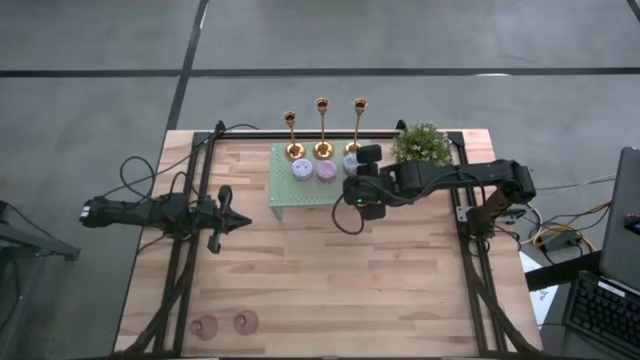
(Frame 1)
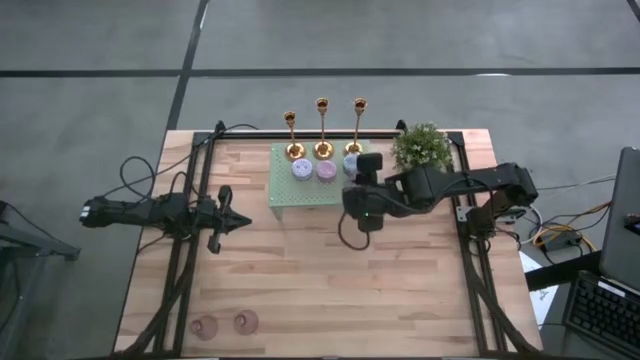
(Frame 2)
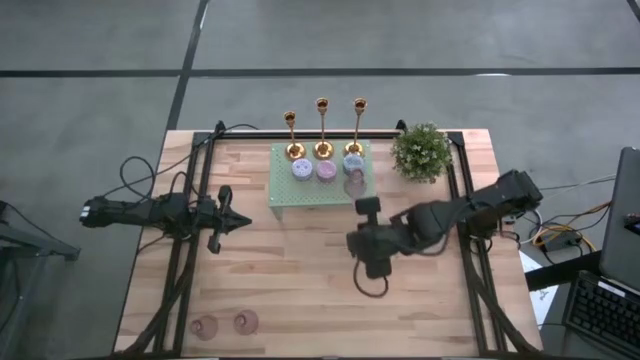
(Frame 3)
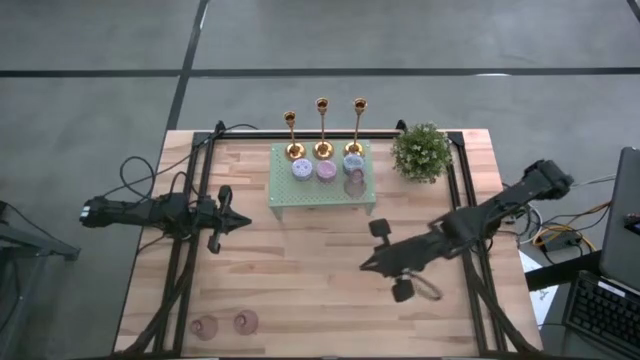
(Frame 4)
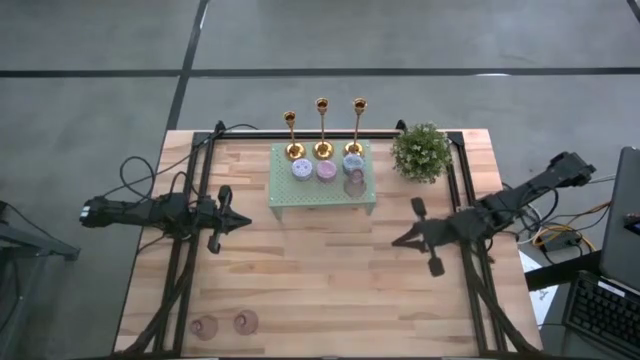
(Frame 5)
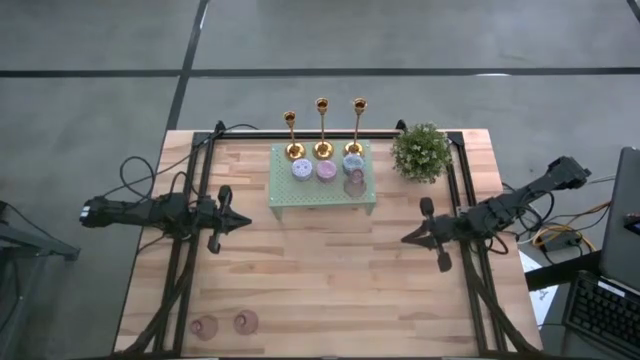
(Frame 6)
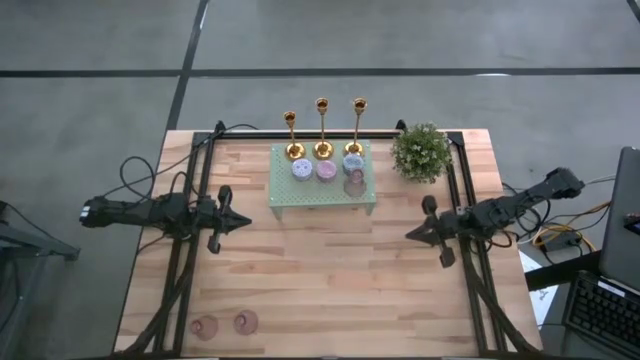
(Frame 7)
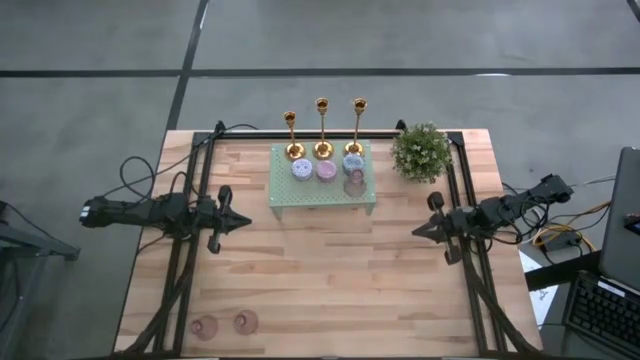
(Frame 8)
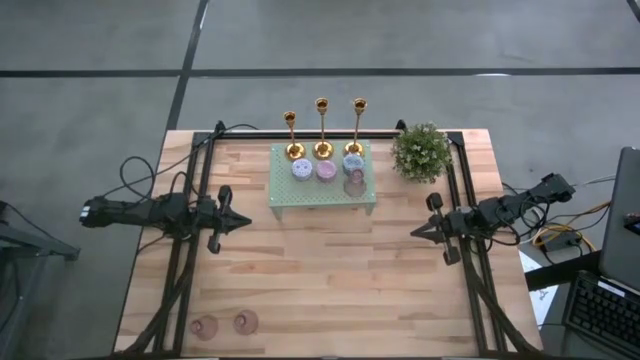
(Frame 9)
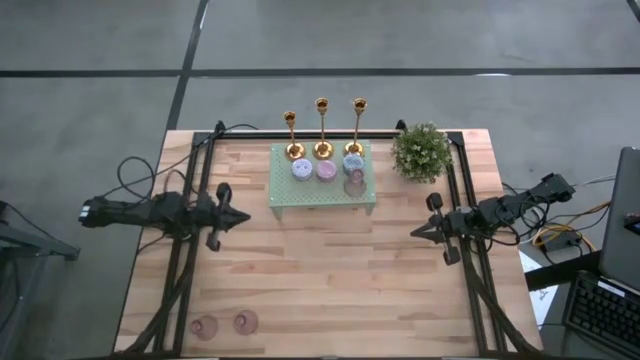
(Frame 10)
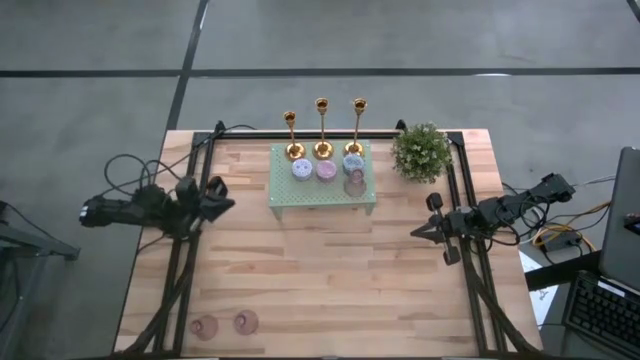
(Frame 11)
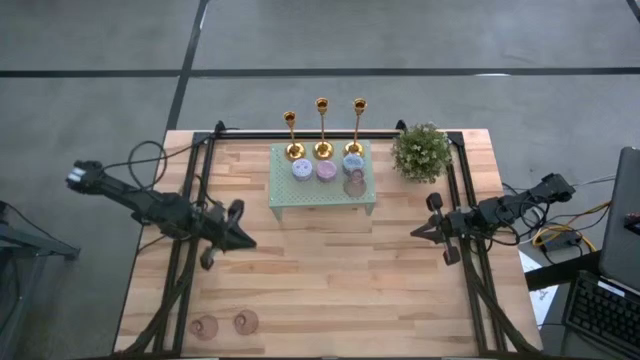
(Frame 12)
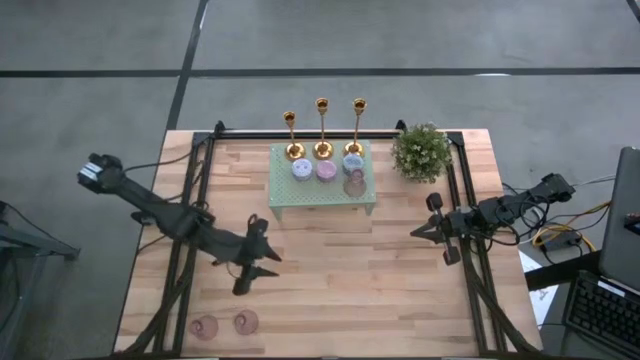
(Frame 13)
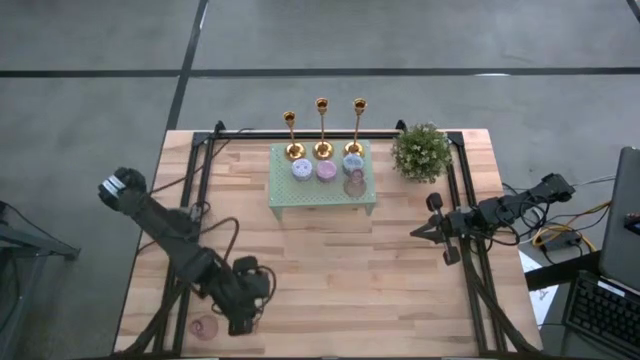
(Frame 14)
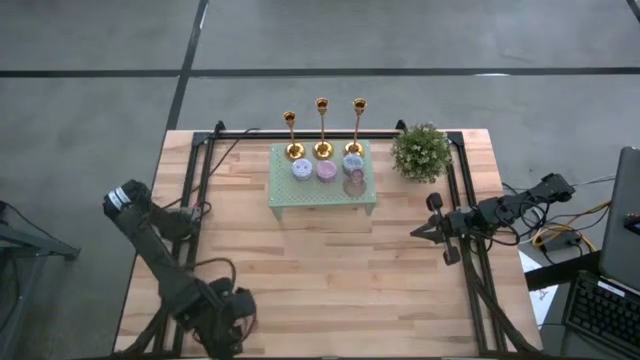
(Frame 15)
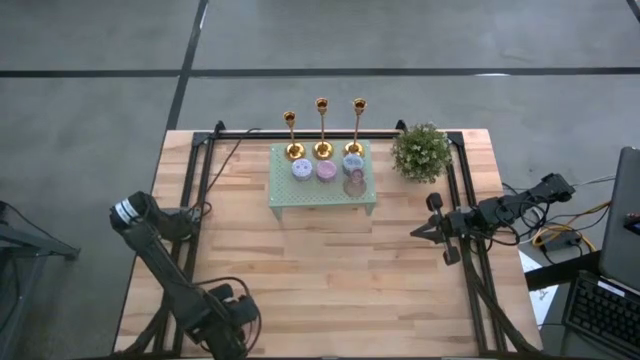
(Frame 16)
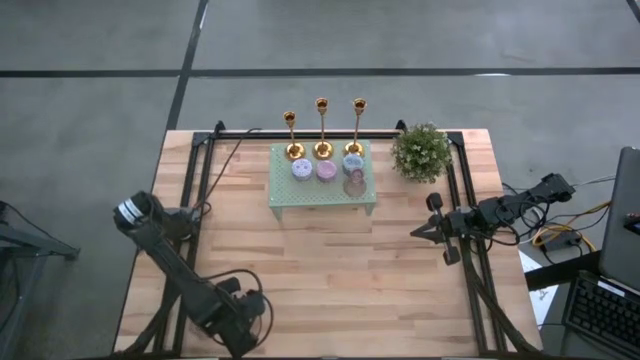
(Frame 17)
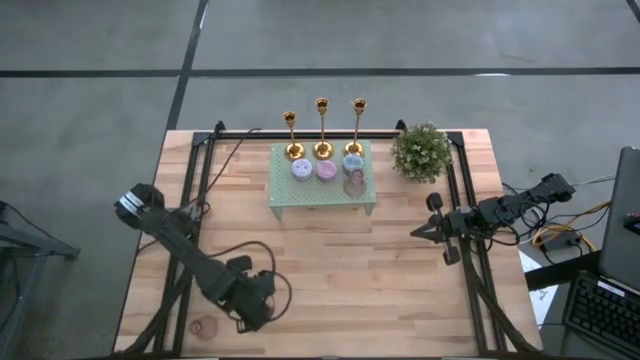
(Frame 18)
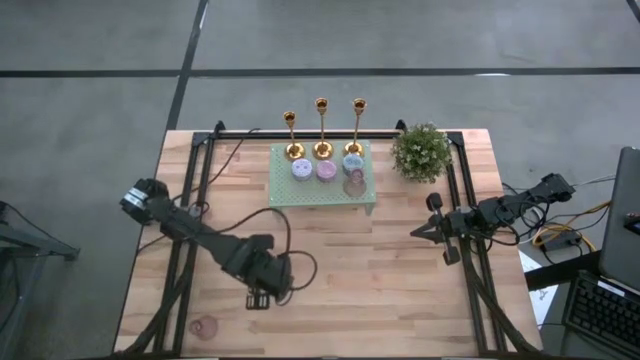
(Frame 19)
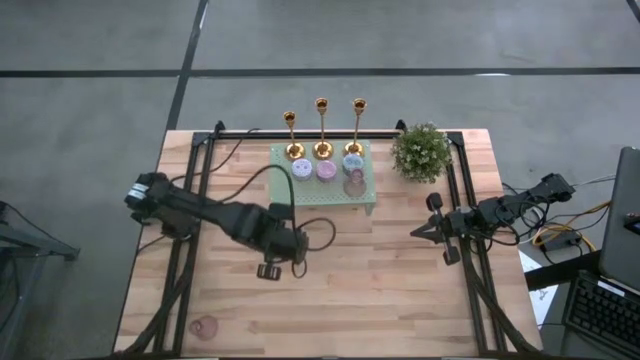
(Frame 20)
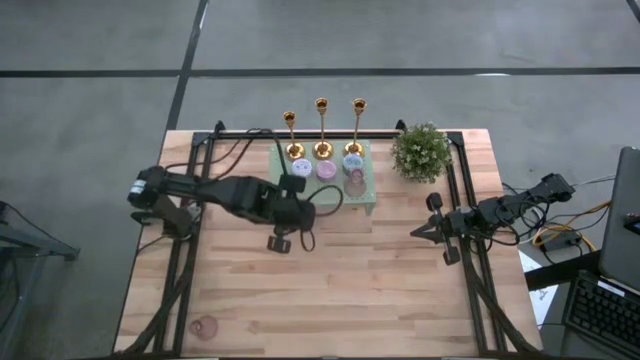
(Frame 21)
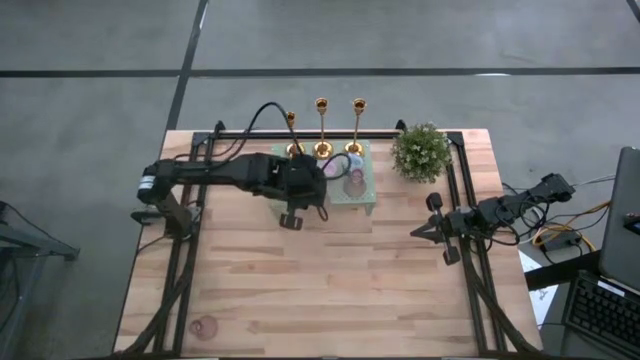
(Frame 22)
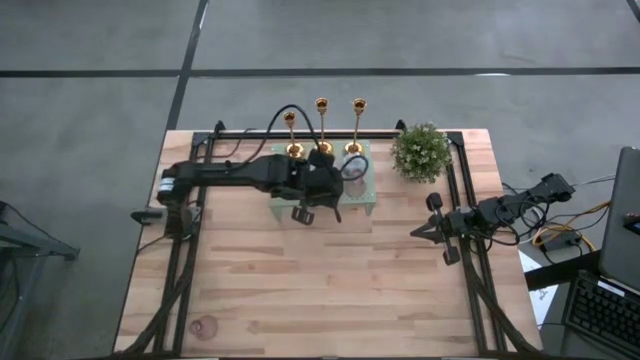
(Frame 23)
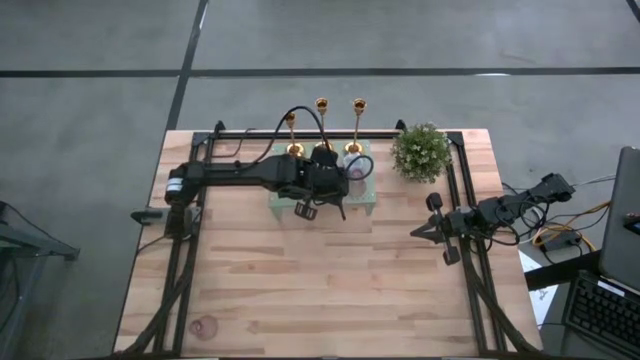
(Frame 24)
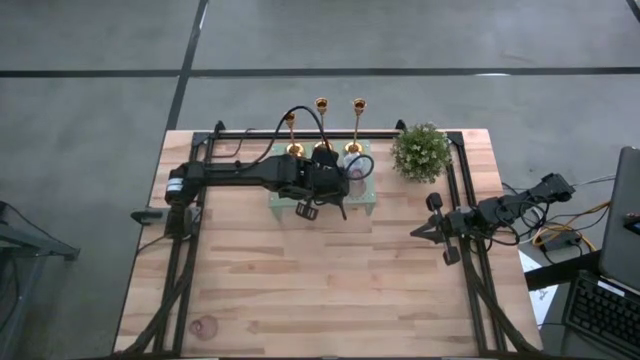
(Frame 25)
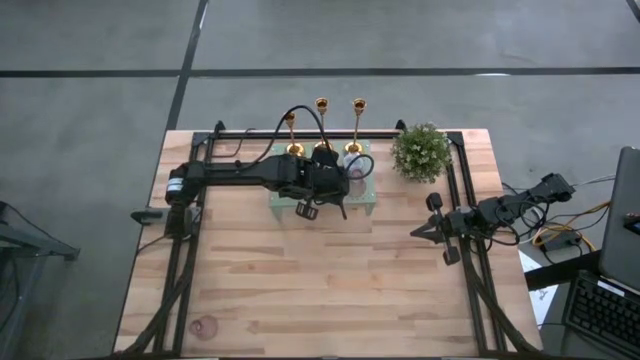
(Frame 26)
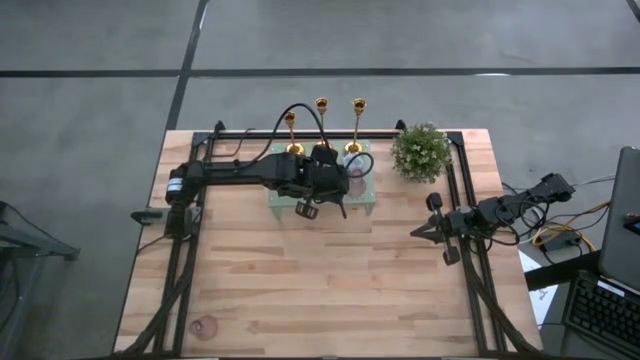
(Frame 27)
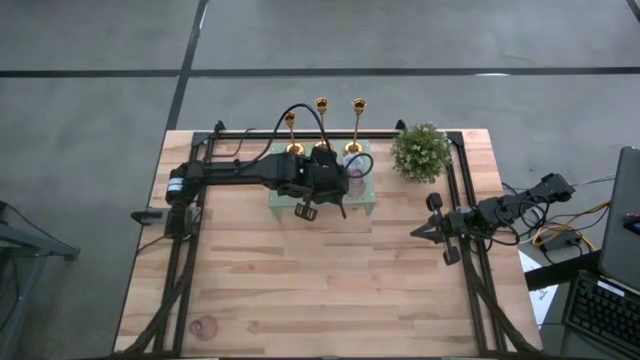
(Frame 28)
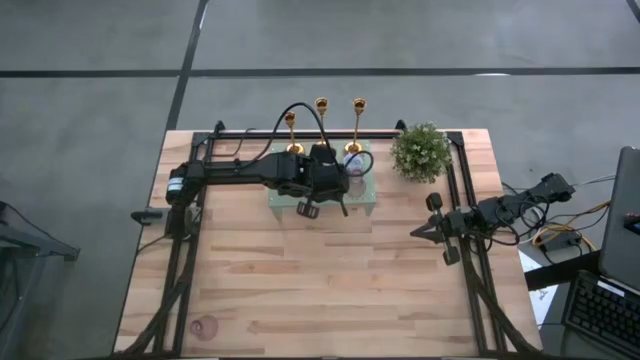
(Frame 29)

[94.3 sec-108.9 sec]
Task: Pick & Place candle stick holders
Put the right pink glass candle holder on the shelf

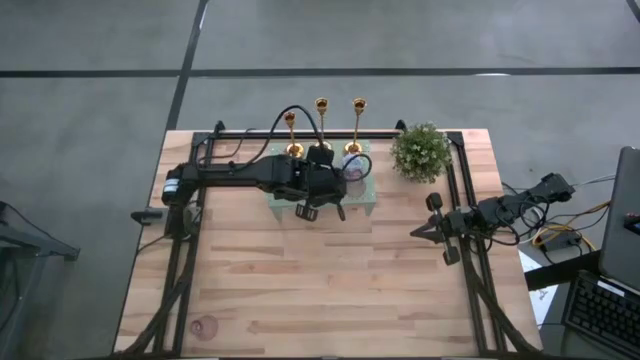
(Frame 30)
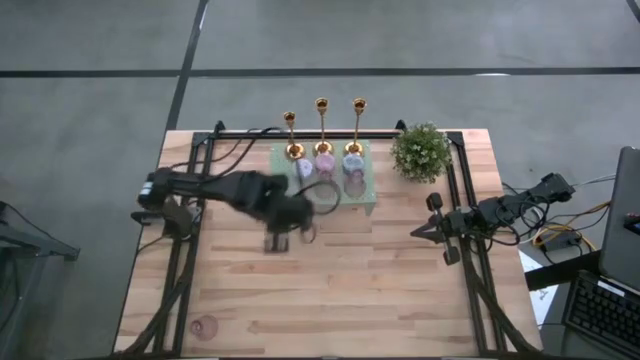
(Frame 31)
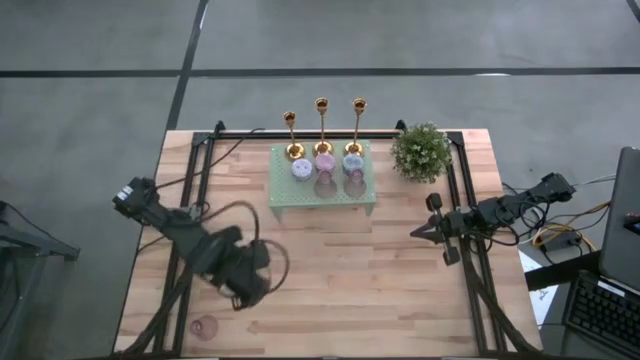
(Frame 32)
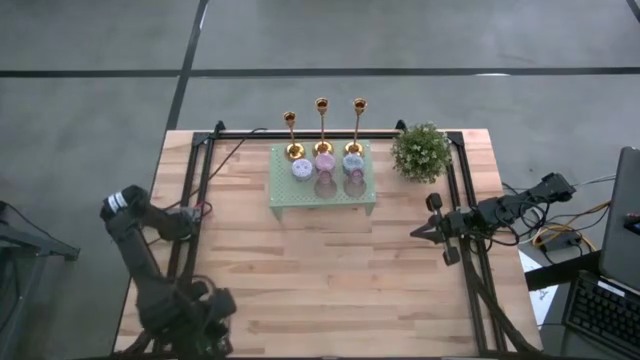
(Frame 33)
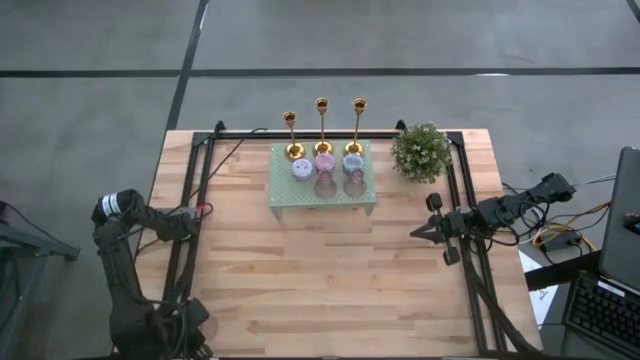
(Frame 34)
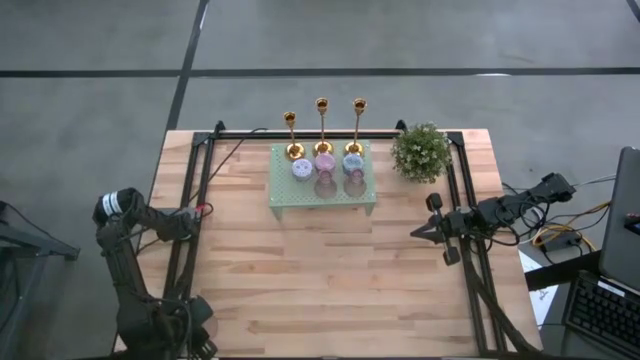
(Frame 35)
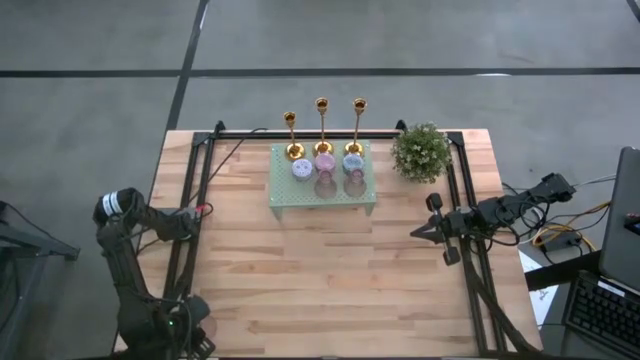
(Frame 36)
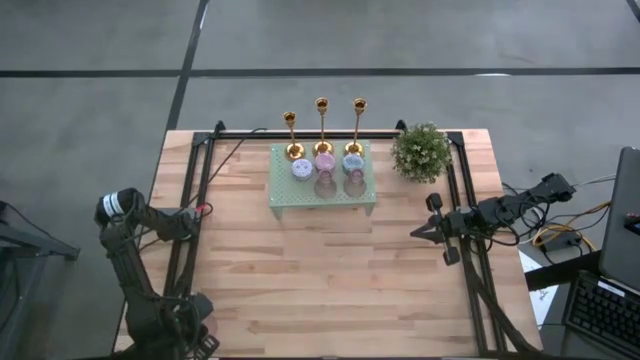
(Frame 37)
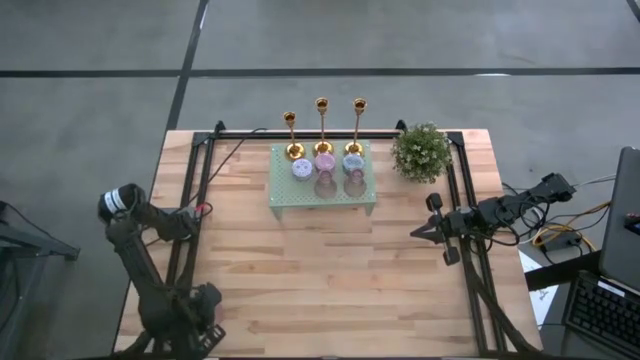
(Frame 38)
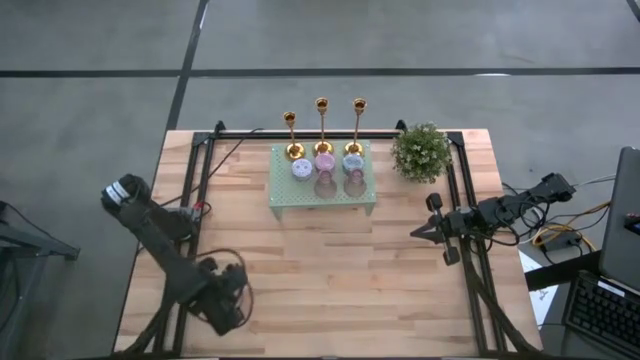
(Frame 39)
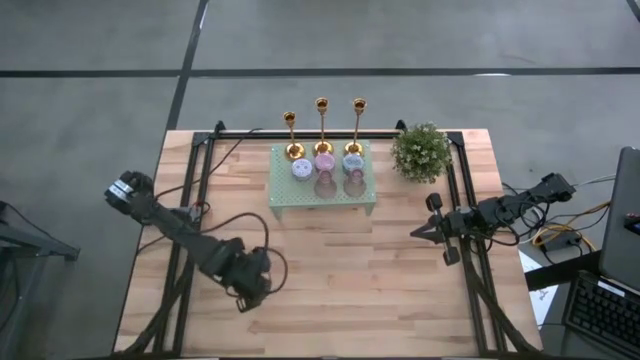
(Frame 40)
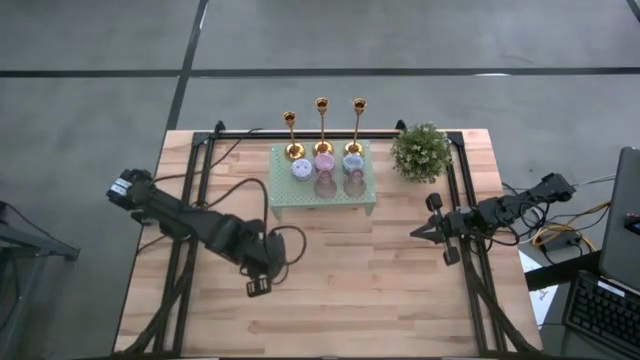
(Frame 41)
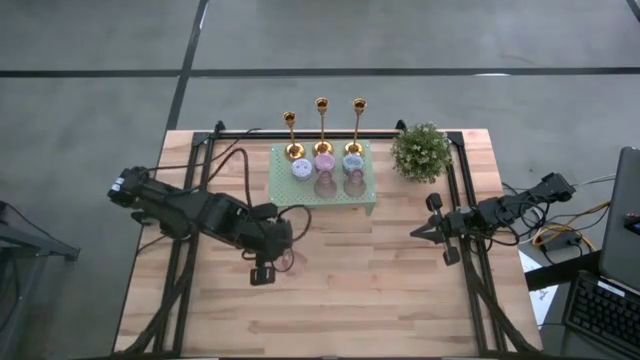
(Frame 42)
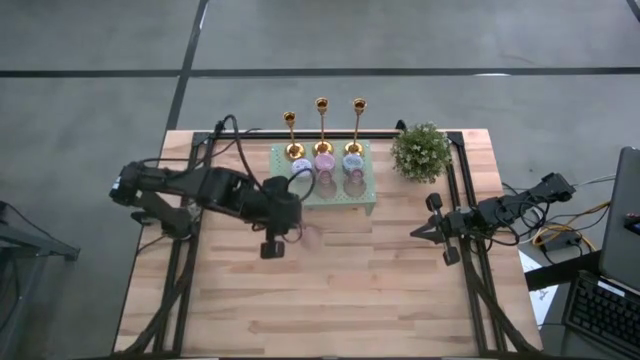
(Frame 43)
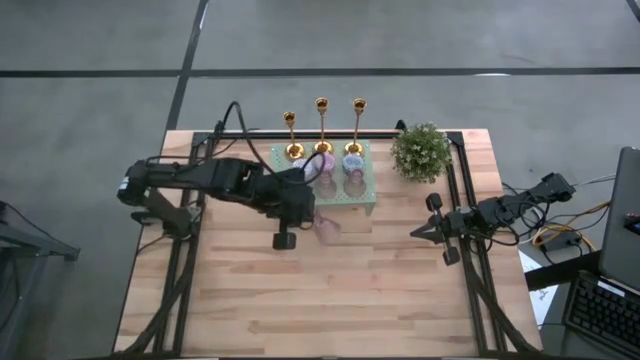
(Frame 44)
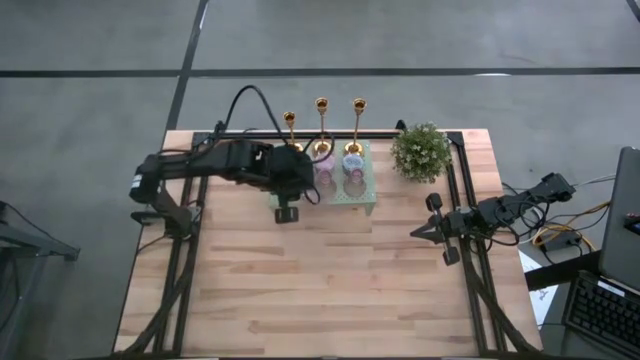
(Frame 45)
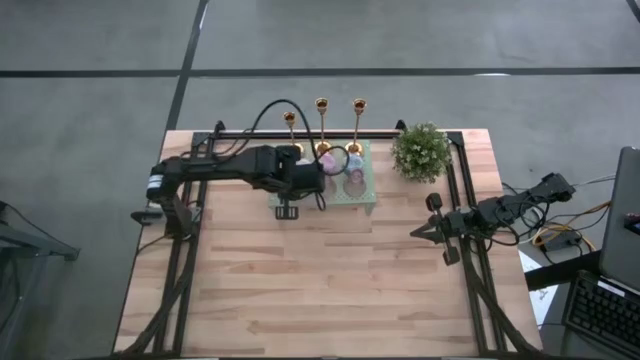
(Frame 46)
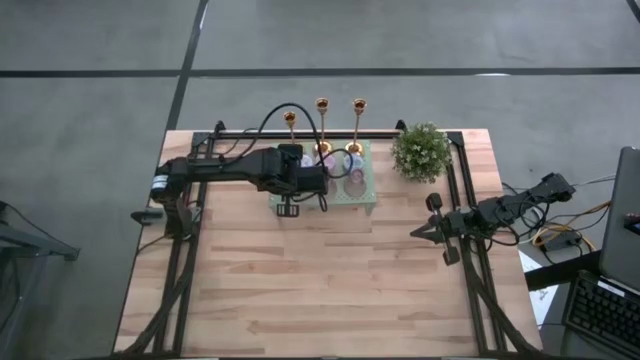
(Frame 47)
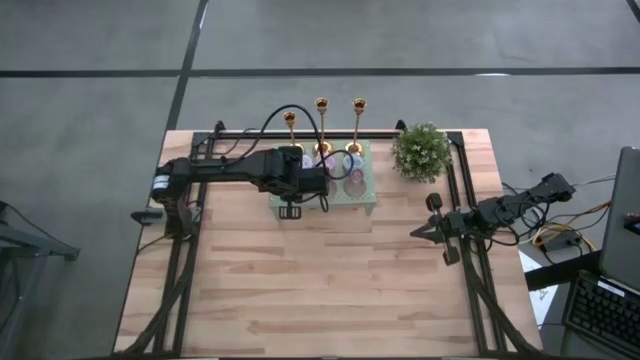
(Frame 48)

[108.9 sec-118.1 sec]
Put the pink glass candle holder on the shelf
